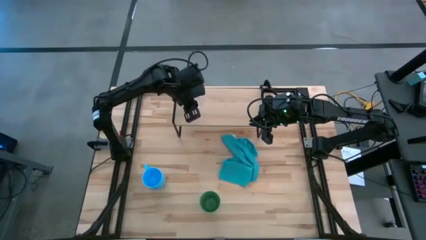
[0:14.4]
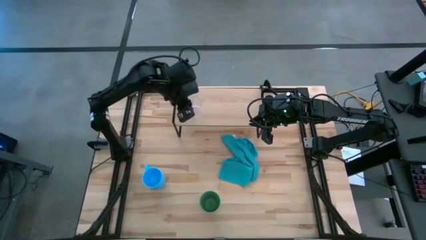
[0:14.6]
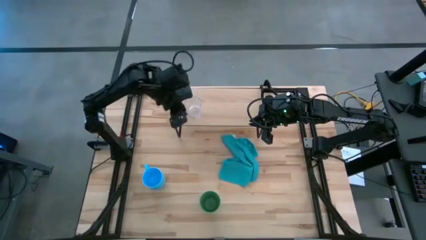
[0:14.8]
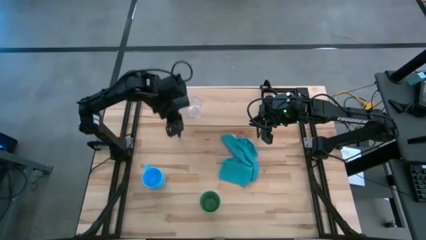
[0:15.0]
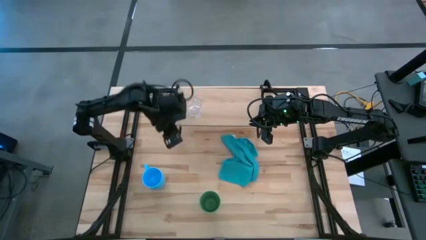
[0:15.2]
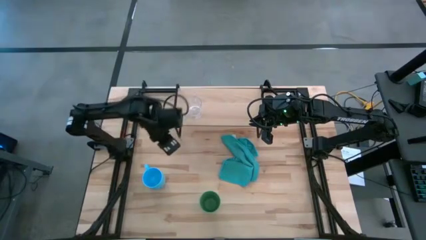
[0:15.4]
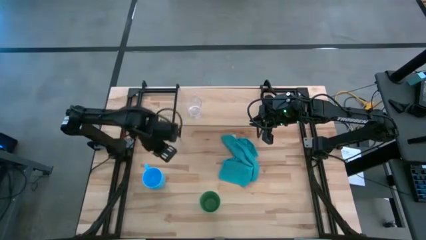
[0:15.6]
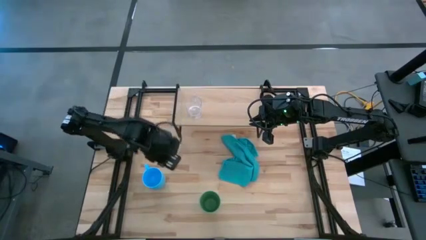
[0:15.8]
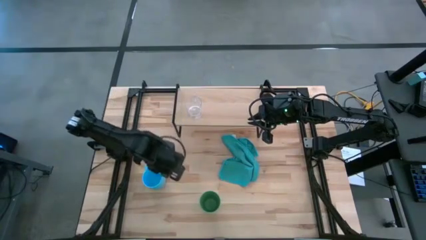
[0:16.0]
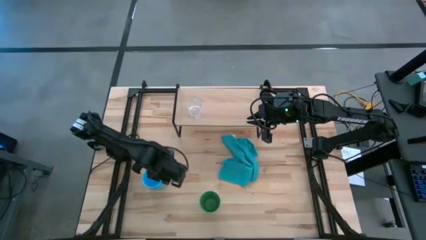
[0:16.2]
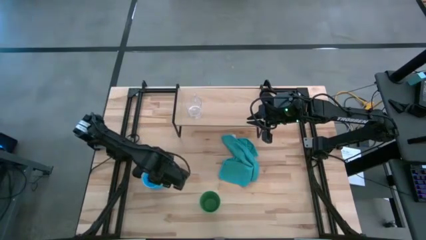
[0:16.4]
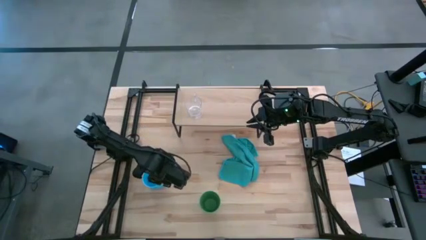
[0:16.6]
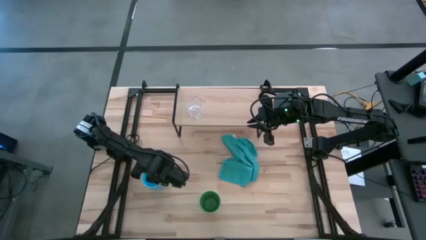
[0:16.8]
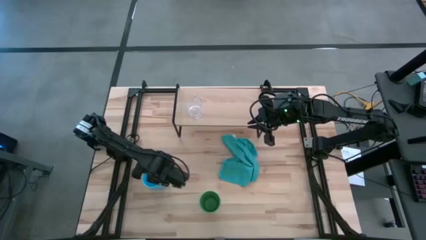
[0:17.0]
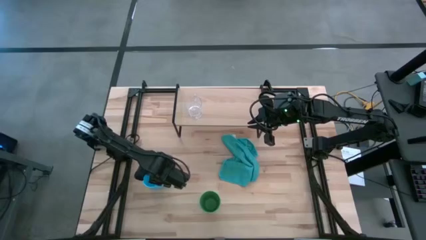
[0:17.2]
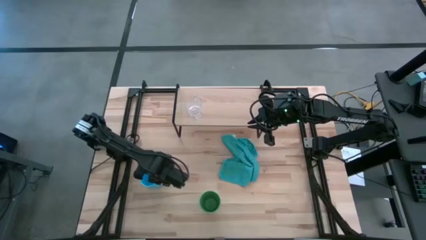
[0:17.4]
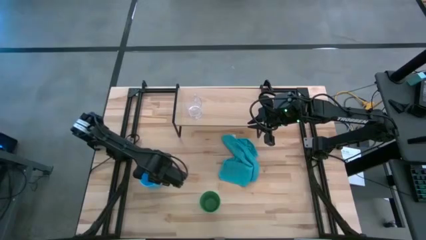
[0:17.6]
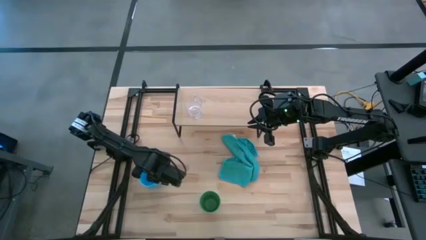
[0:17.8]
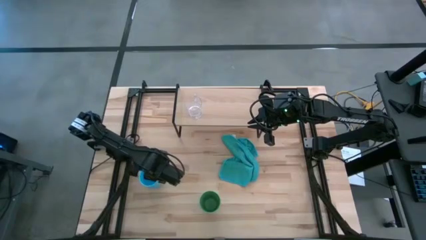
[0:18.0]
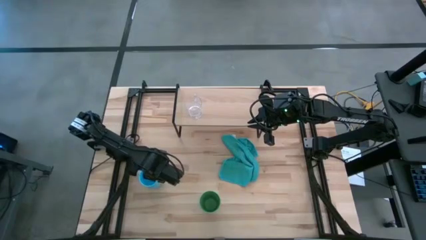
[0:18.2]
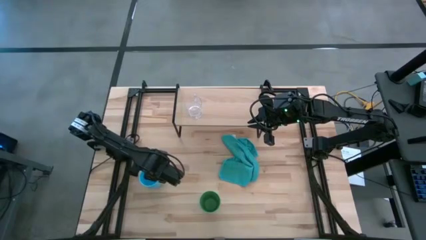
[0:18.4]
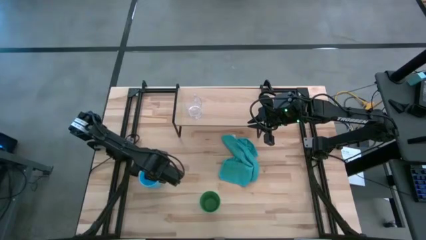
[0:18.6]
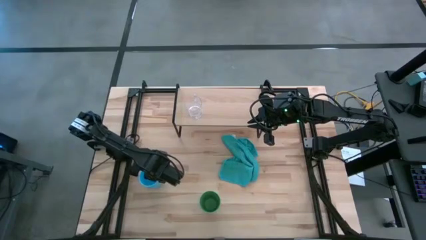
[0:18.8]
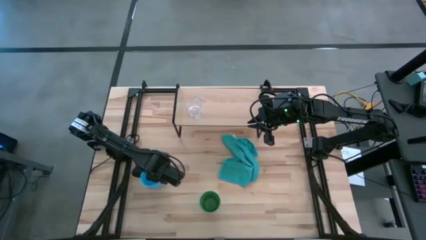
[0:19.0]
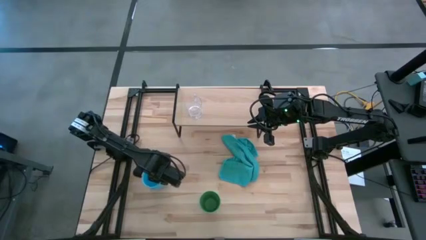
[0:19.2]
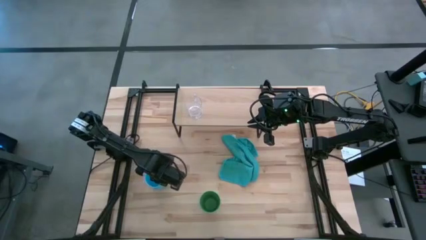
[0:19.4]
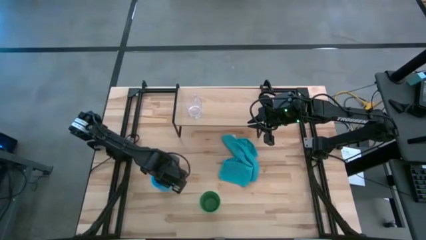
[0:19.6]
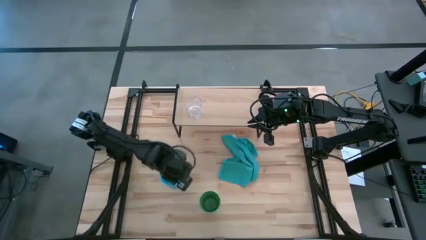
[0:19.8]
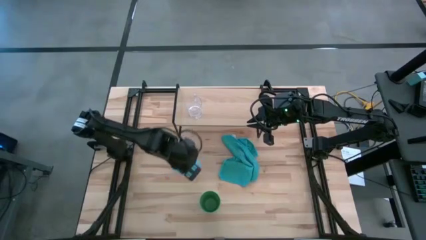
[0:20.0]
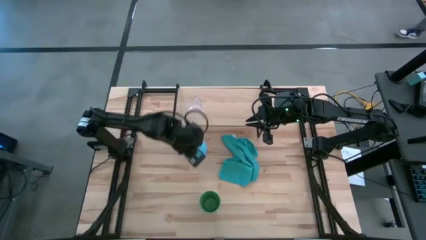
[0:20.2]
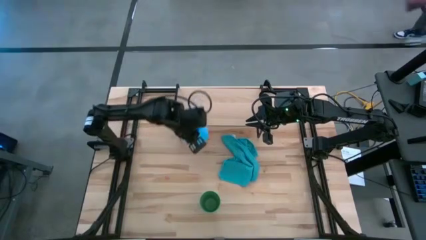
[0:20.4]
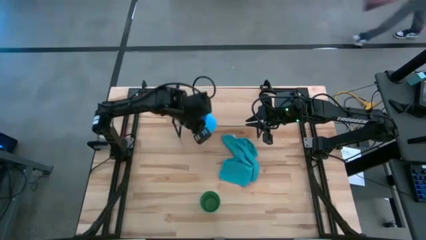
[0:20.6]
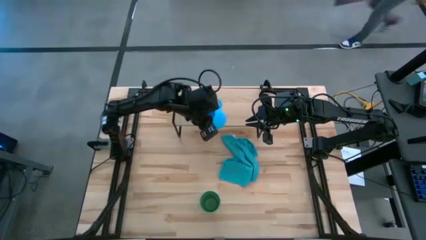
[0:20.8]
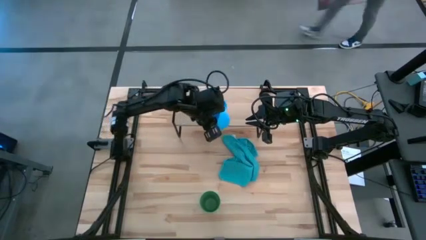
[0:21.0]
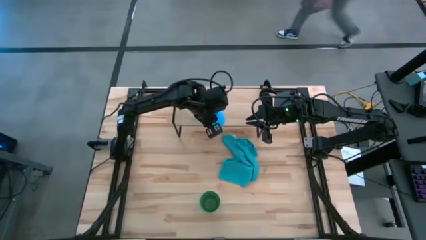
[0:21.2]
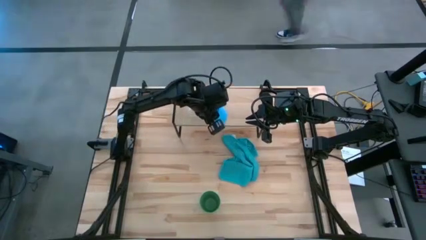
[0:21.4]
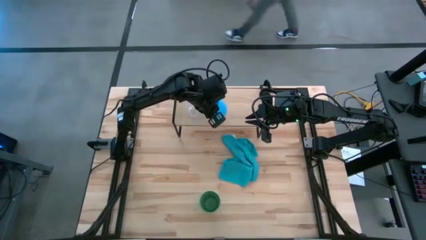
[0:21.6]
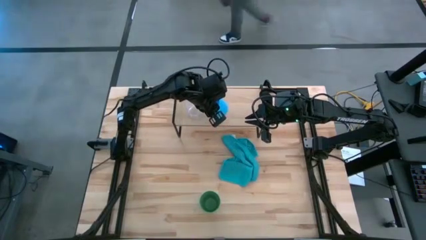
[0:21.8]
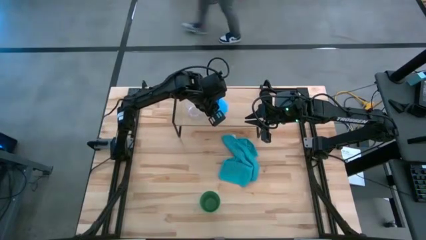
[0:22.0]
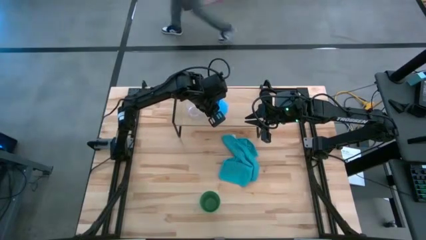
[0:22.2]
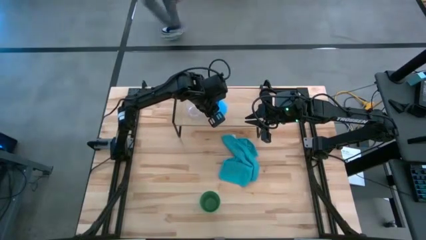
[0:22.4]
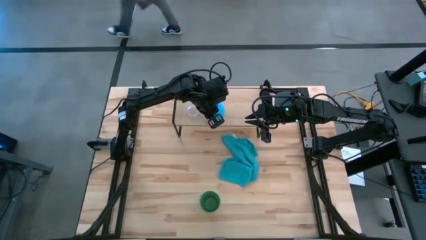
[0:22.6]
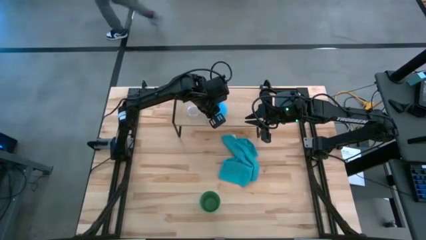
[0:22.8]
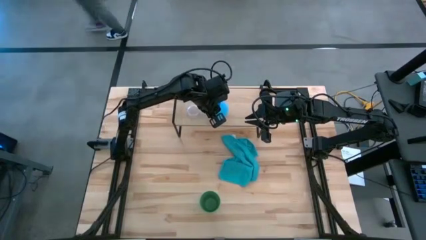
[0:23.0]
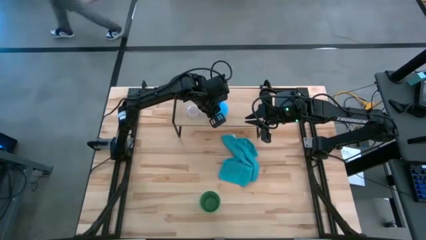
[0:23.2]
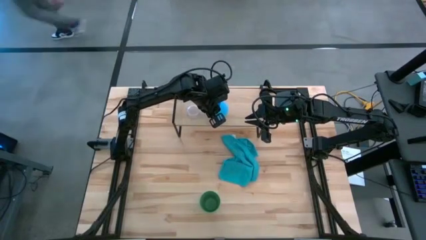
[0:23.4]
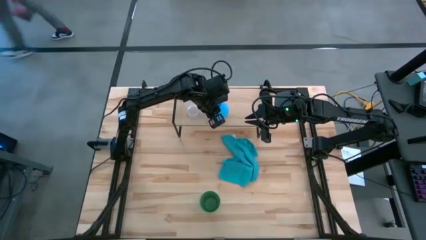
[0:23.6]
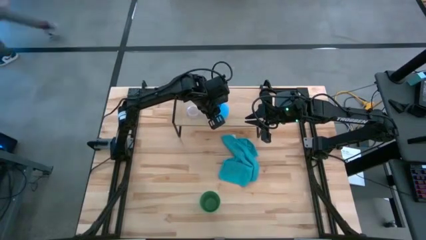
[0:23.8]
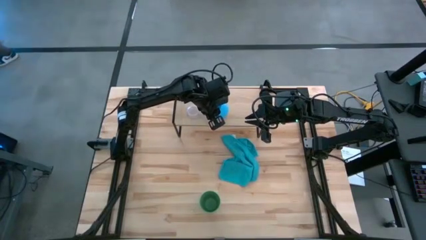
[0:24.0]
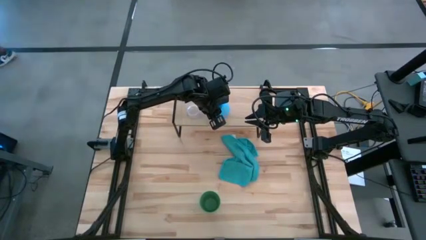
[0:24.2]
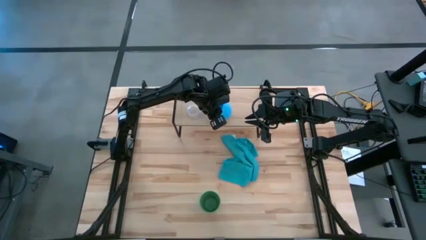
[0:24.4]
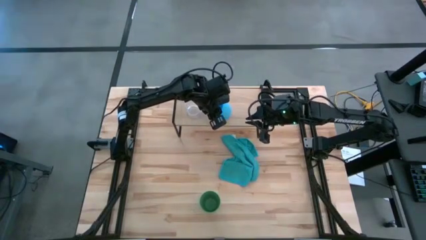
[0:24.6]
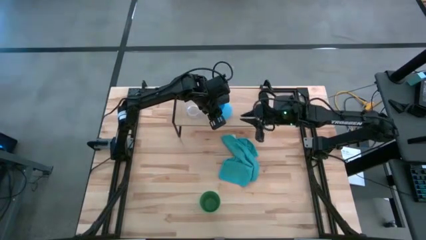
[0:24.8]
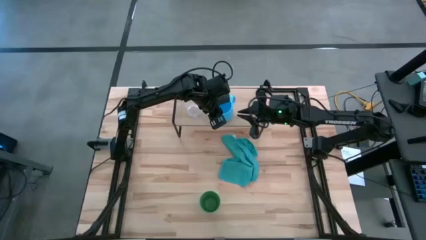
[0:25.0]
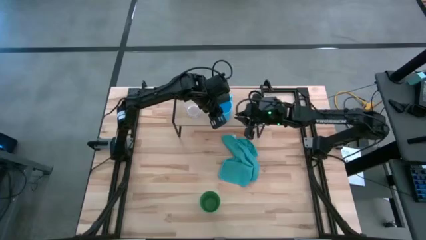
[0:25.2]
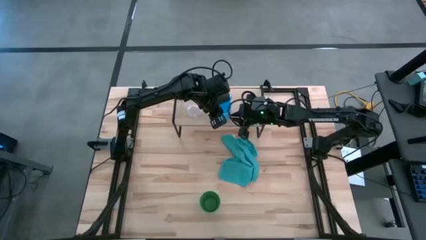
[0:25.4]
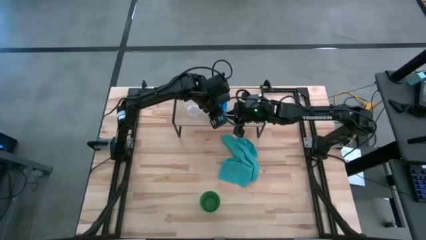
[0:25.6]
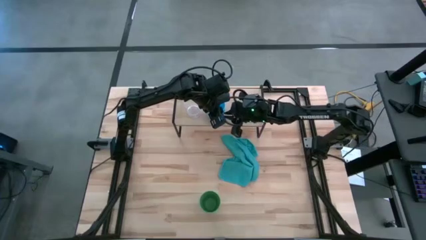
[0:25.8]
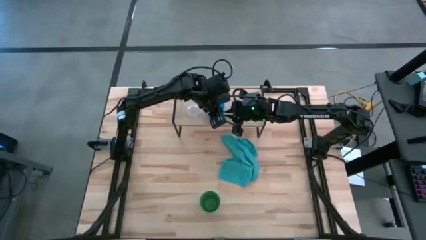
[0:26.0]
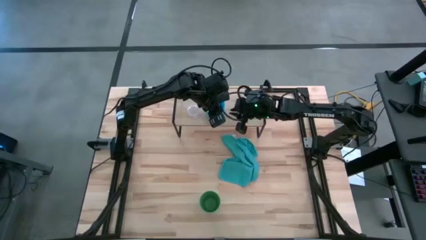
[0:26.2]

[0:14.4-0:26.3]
Task: Stack small to large cups/mugs on shelf
Put the blue mug on the shelf
